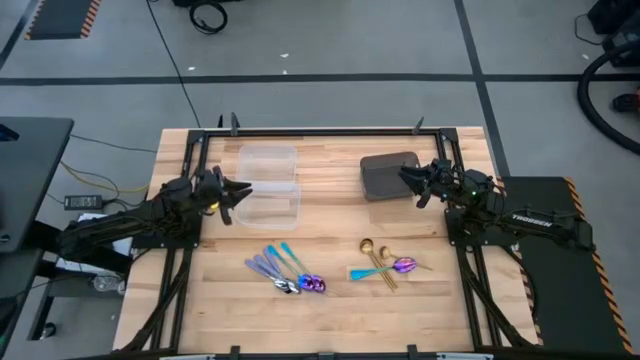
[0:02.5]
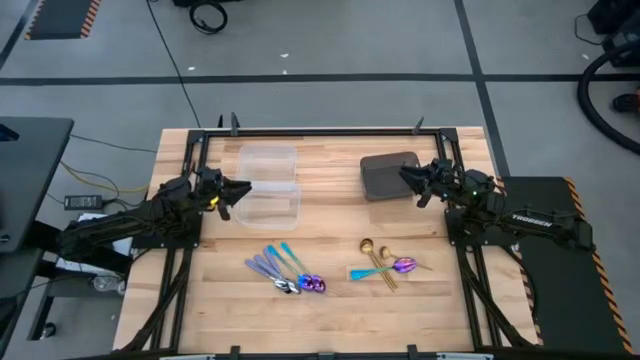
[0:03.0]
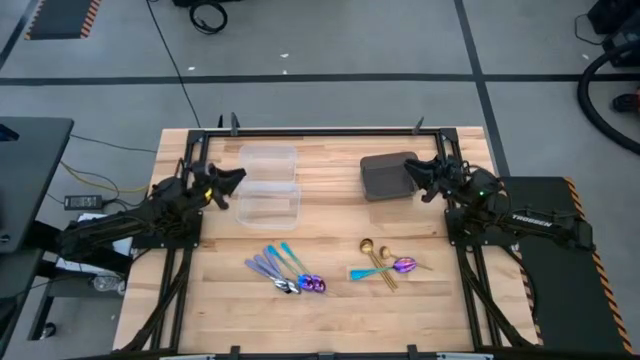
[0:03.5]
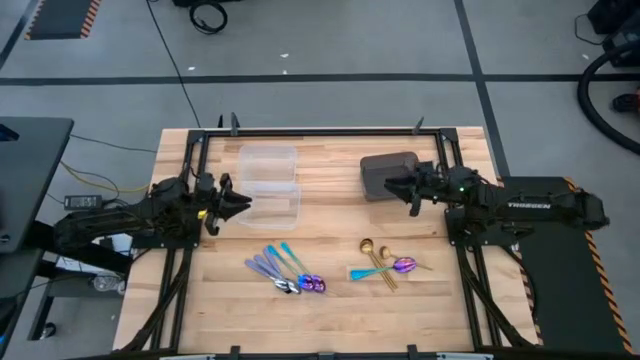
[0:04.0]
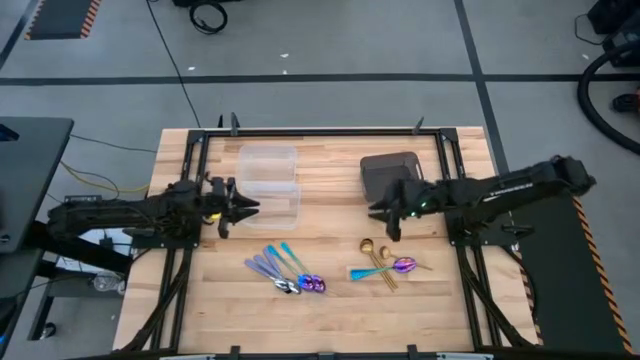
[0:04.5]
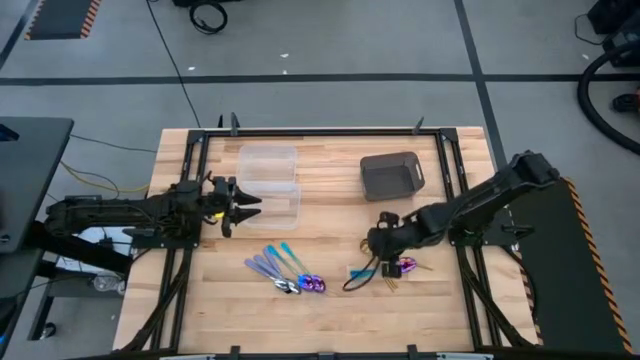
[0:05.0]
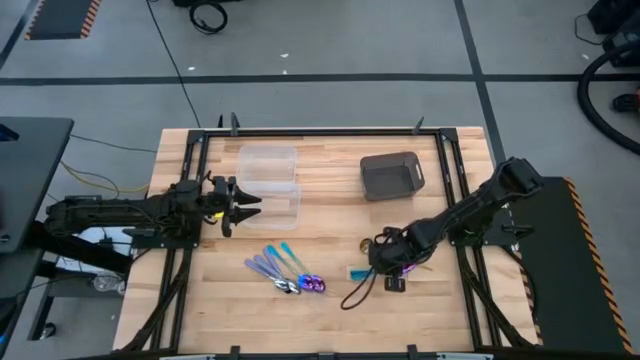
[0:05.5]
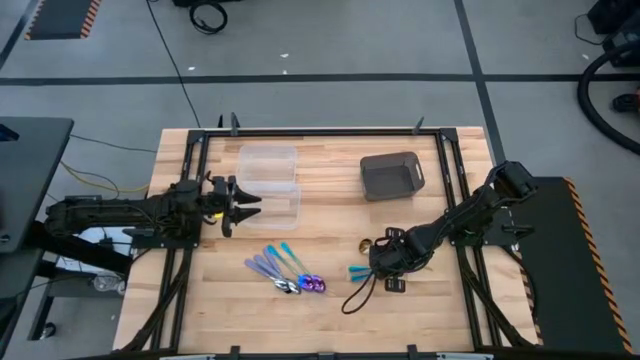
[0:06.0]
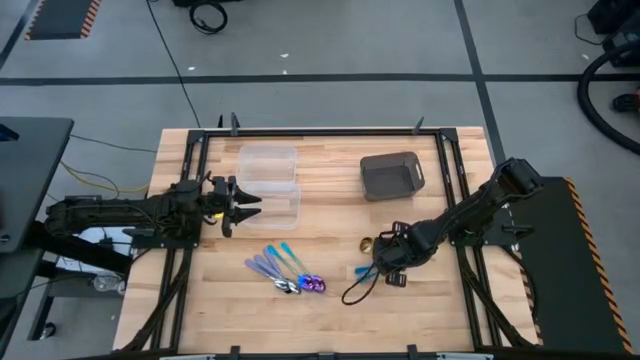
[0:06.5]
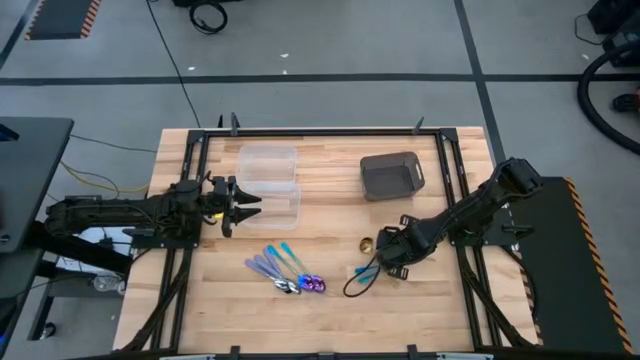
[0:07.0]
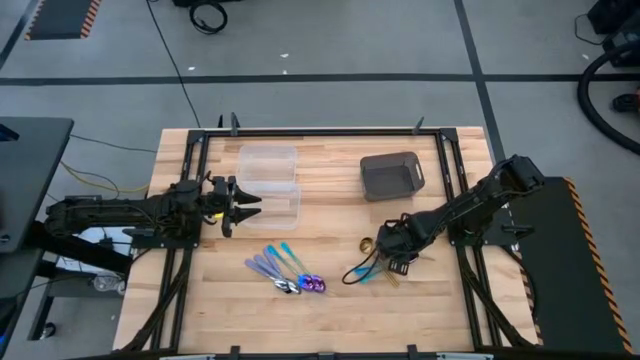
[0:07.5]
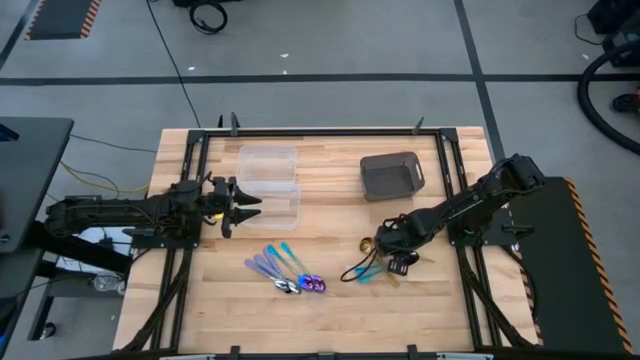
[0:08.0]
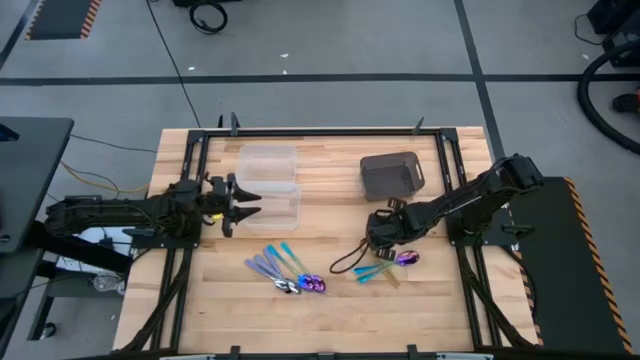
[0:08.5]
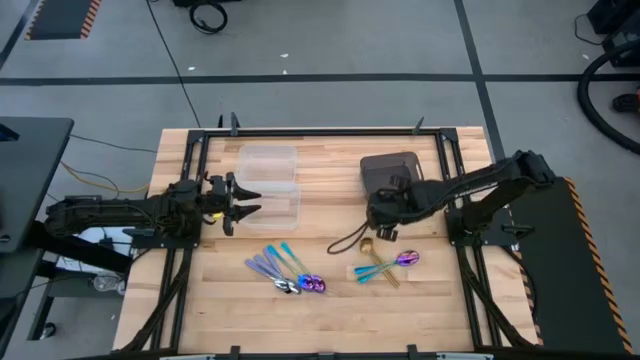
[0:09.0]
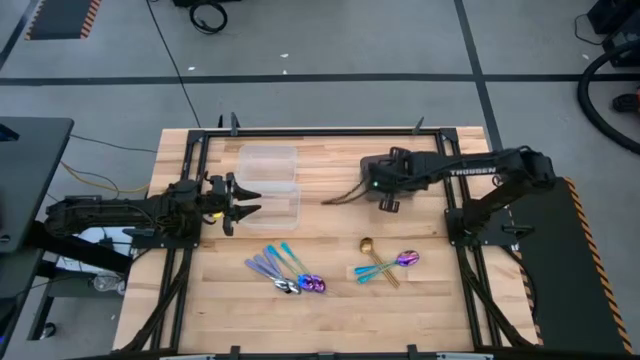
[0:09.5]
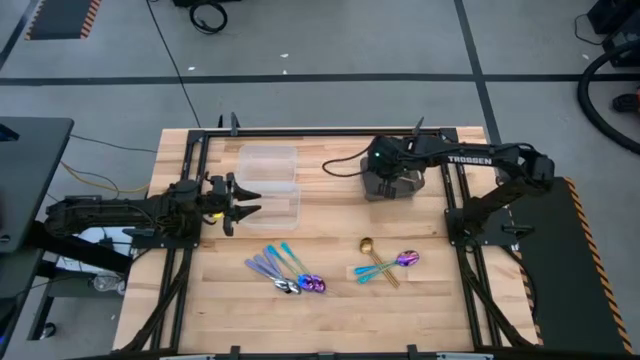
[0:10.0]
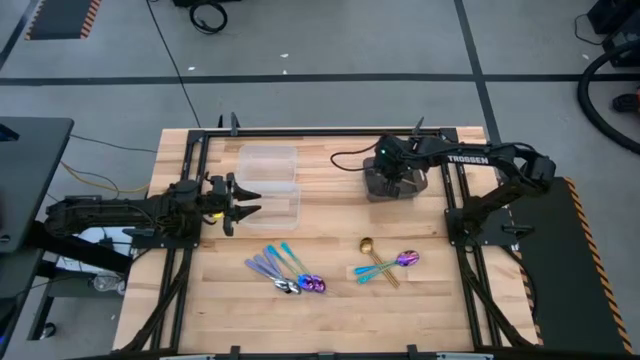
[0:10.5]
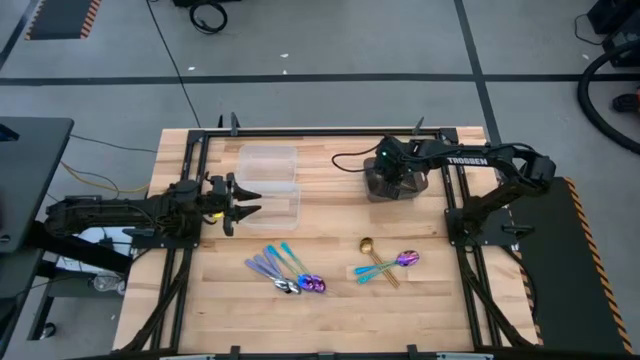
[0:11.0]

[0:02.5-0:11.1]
Task: Sort silverware by color (type)
Put the gold spoon into the black bin

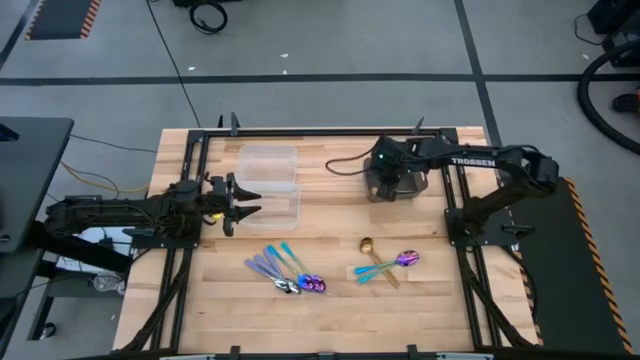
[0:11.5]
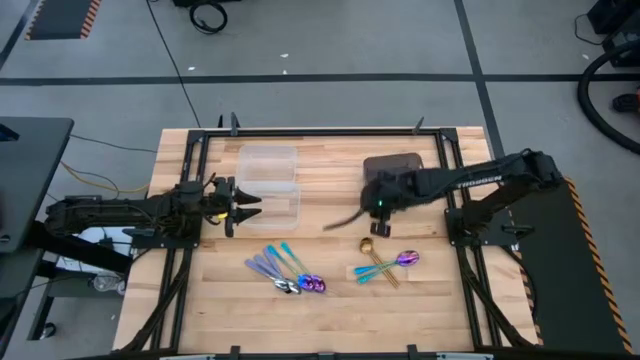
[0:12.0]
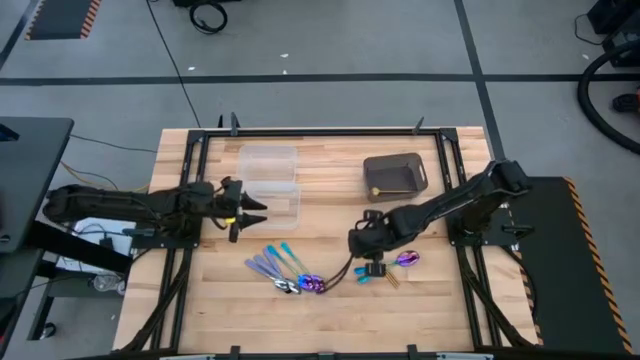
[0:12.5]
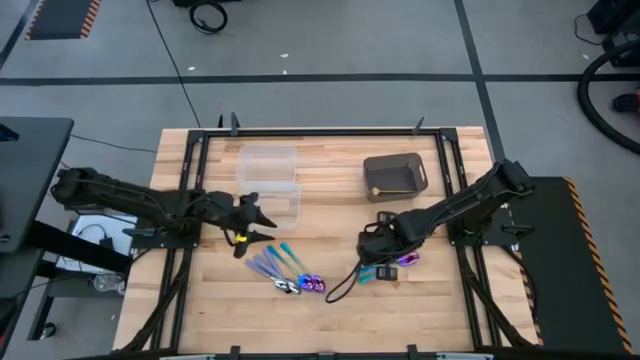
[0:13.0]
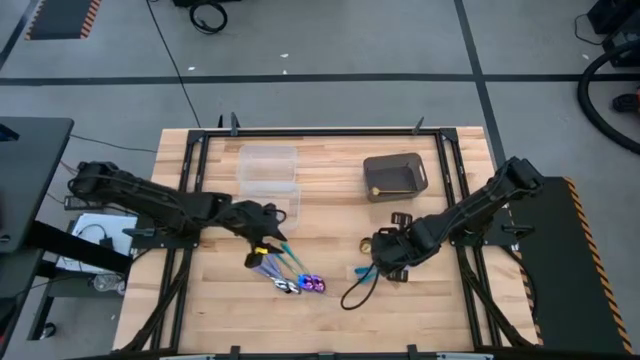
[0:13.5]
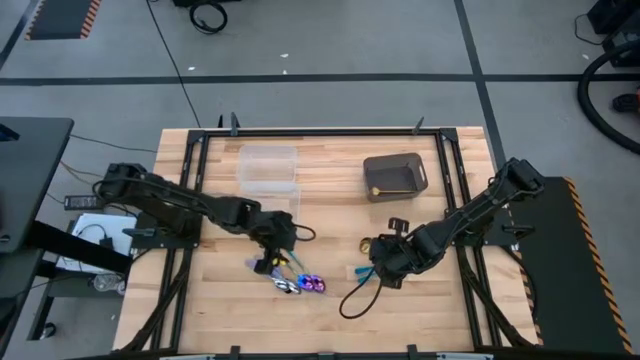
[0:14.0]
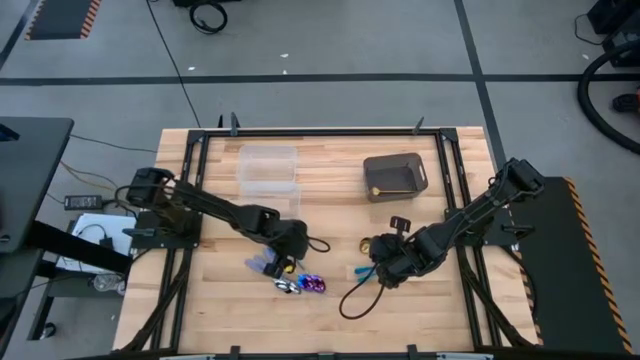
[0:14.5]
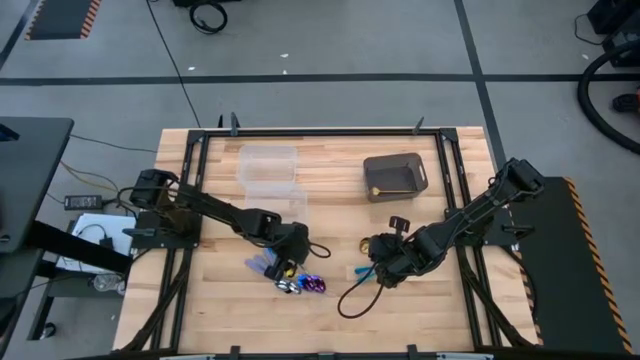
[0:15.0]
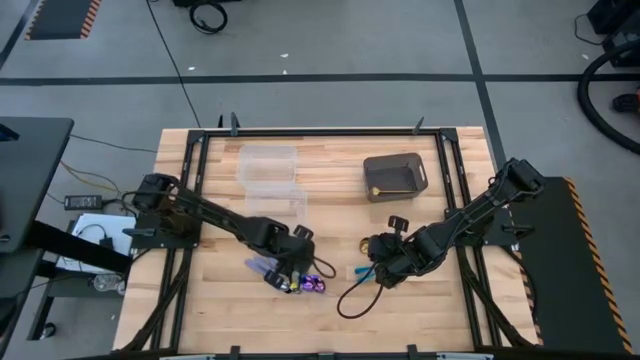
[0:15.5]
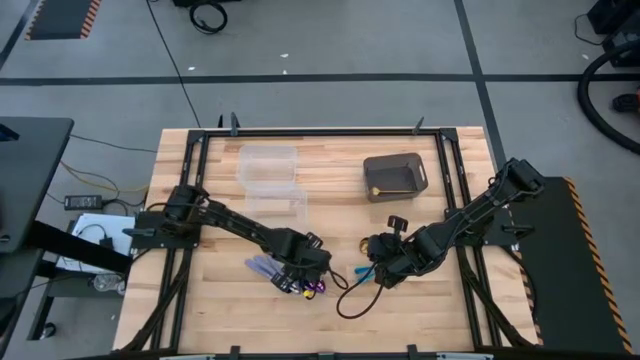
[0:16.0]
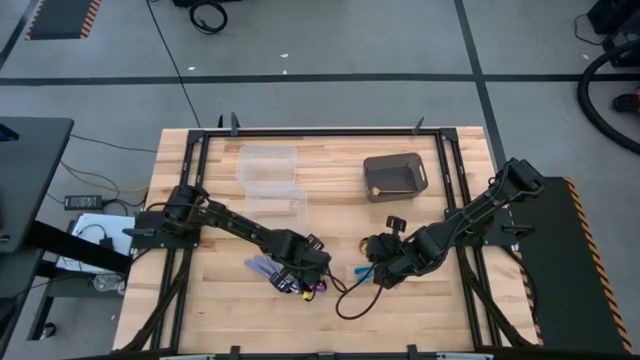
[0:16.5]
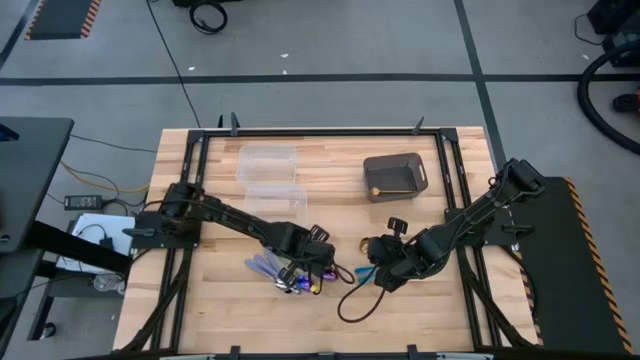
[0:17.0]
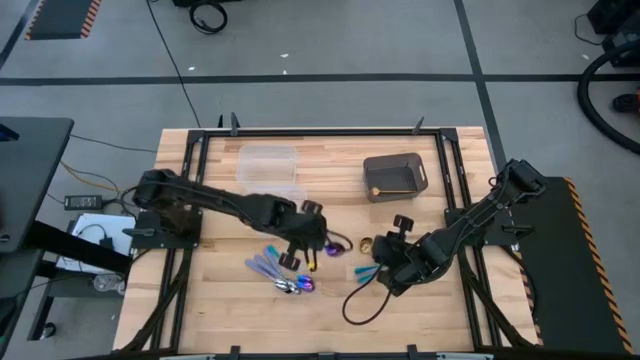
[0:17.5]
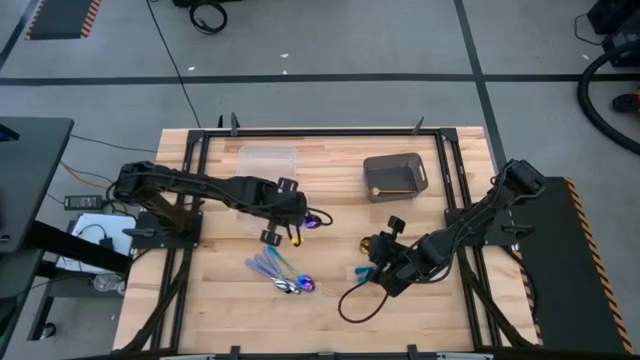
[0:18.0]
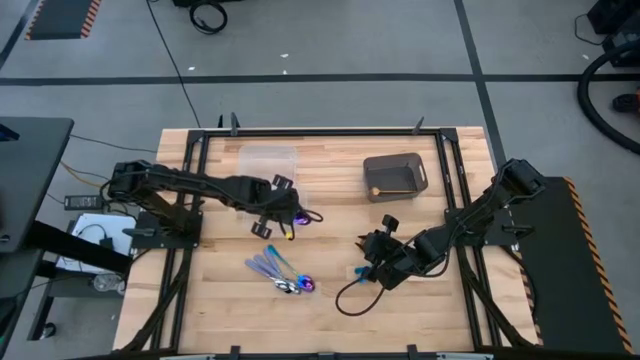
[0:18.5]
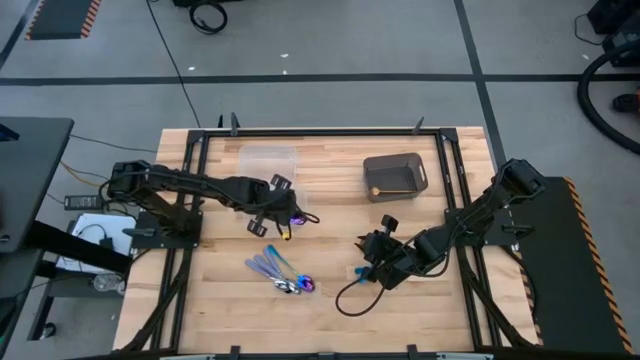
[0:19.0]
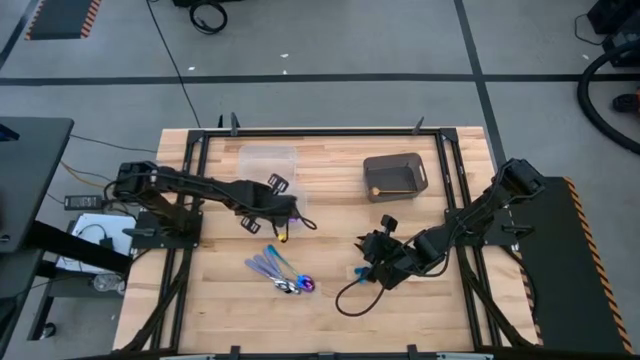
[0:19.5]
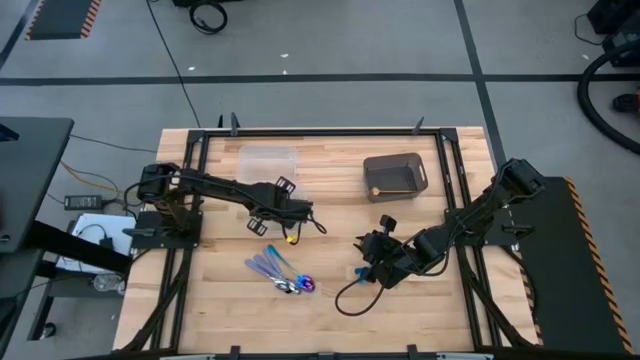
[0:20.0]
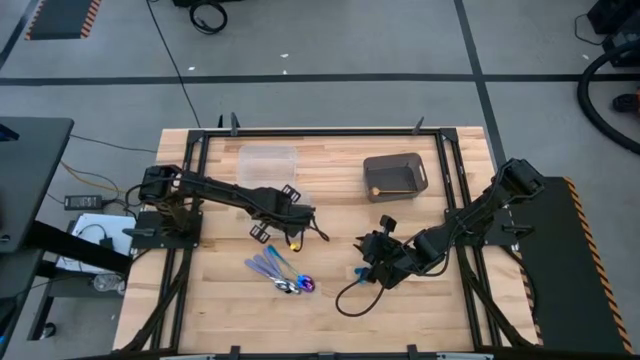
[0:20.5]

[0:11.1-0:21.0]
Put the blue spoon into the bottom transparent bin

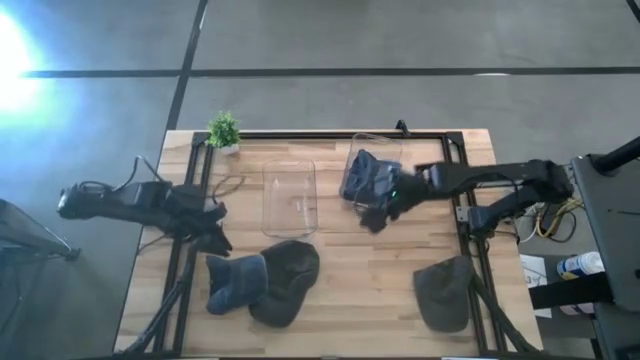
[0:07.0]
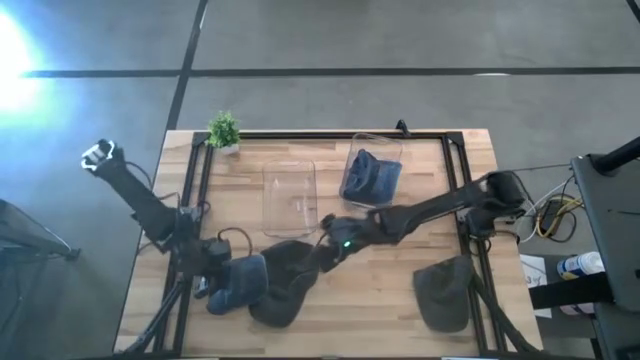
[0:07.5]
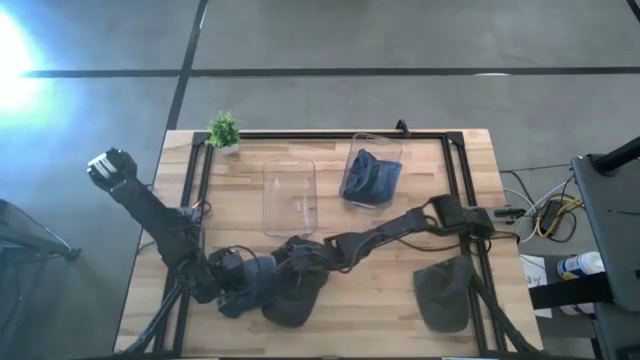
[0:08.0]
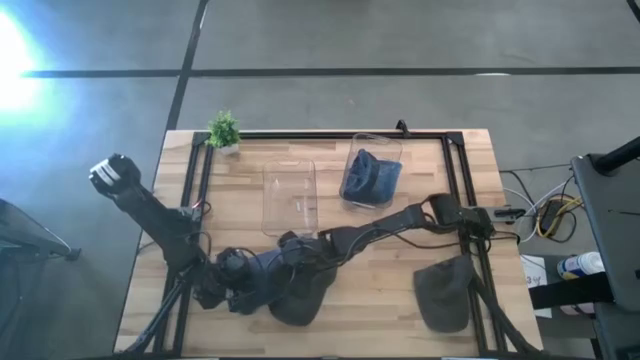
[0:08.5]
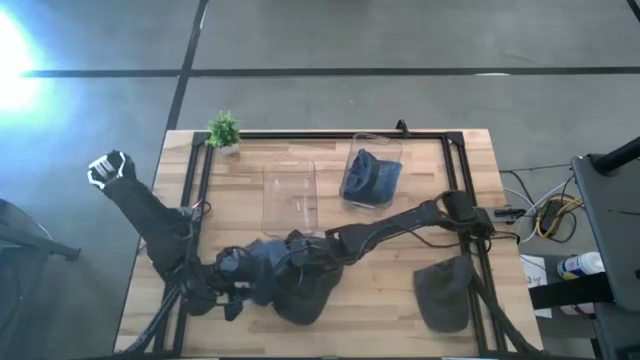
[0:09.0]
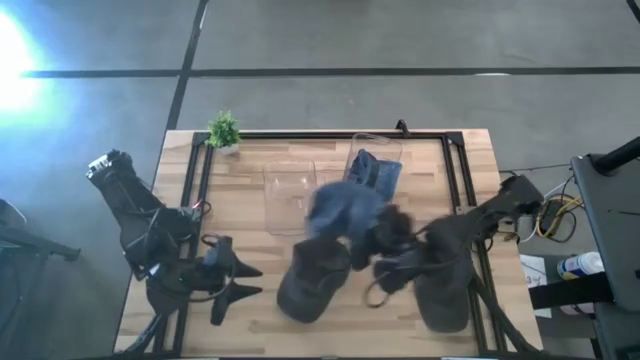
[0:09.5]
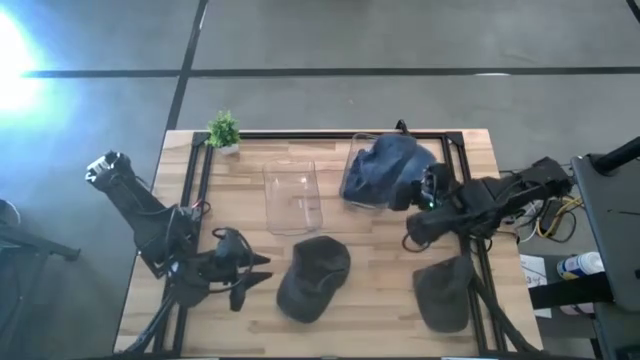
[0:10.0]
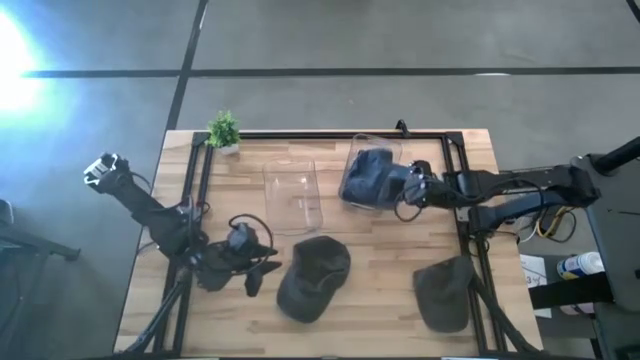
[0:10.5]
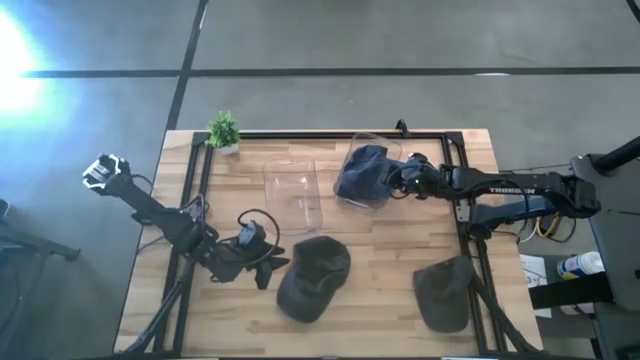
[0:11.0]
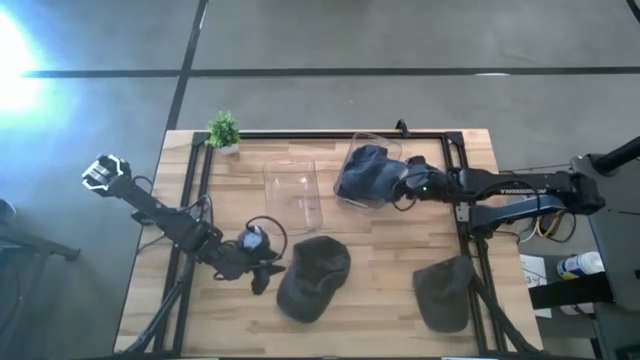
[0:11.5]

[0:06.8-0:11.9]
Task: Pick & Place hat
Put the blue cap into the right transparent bin
